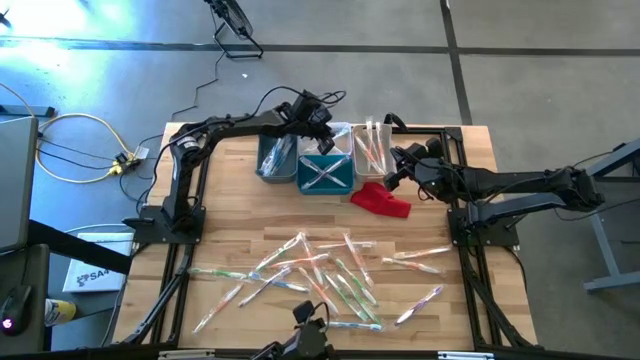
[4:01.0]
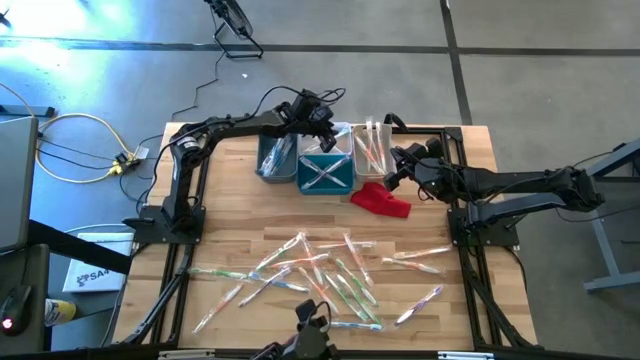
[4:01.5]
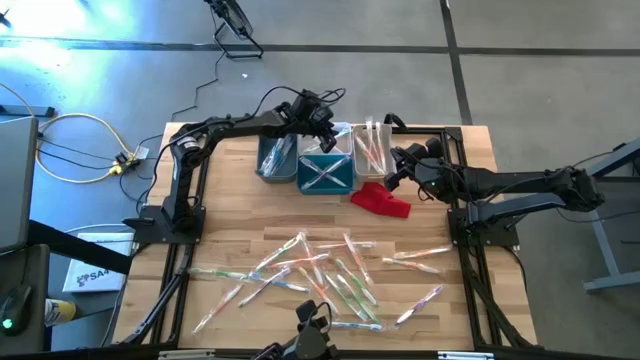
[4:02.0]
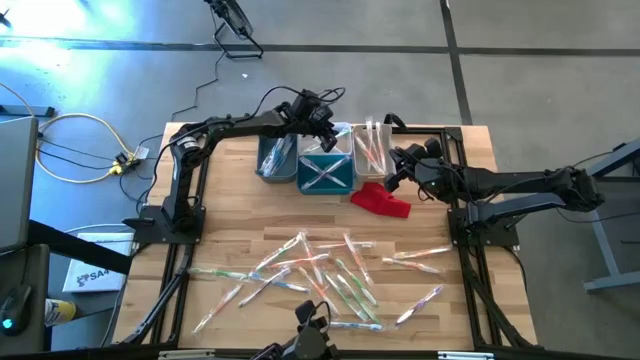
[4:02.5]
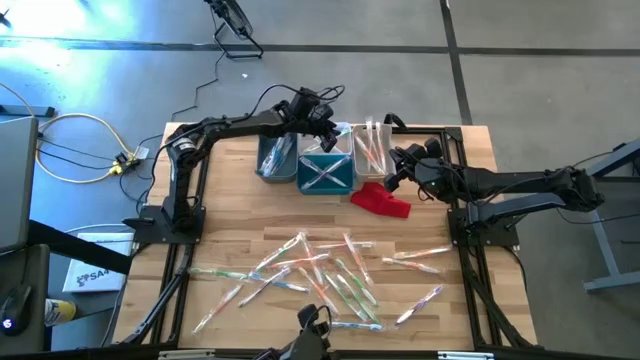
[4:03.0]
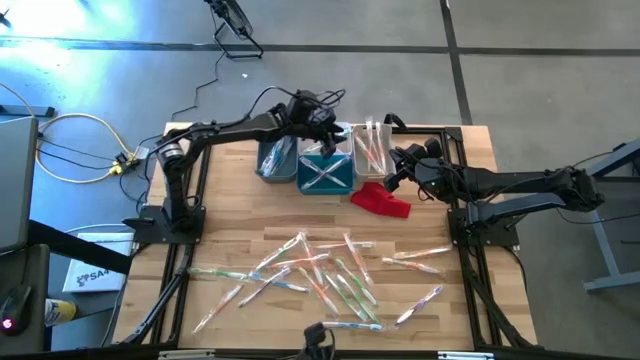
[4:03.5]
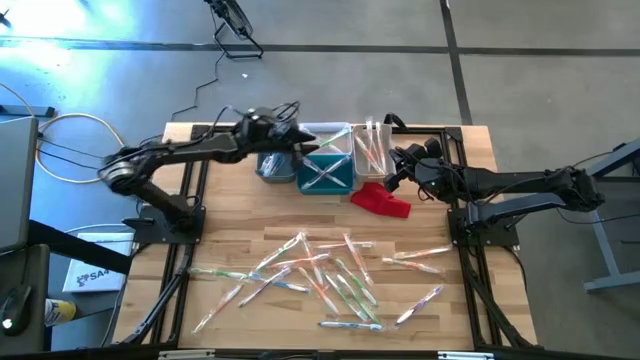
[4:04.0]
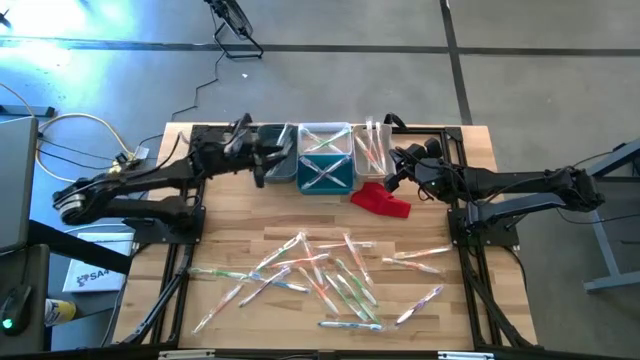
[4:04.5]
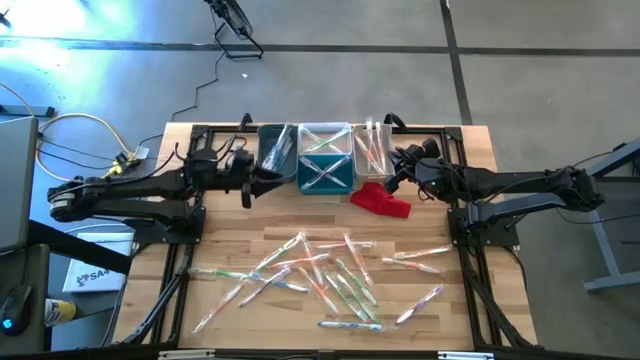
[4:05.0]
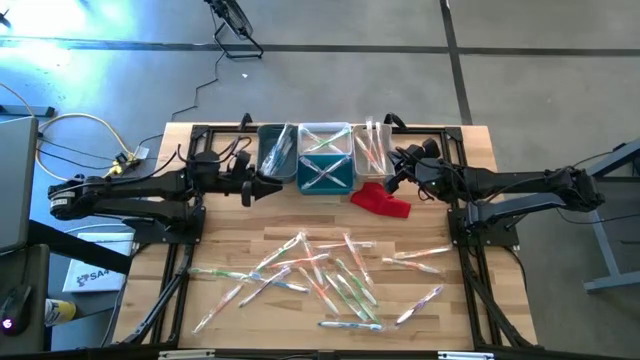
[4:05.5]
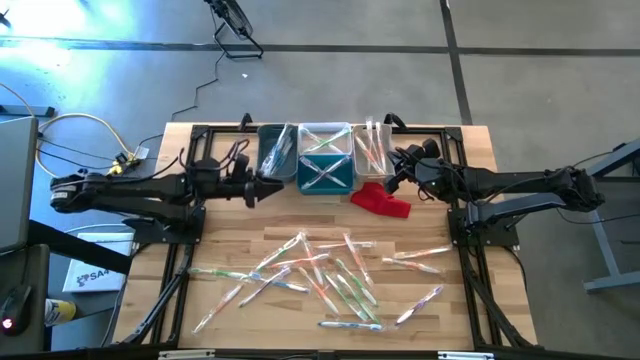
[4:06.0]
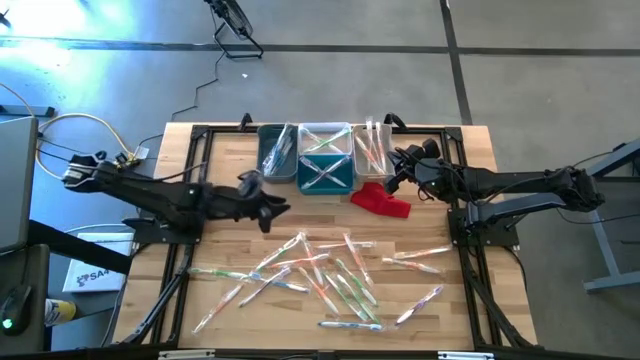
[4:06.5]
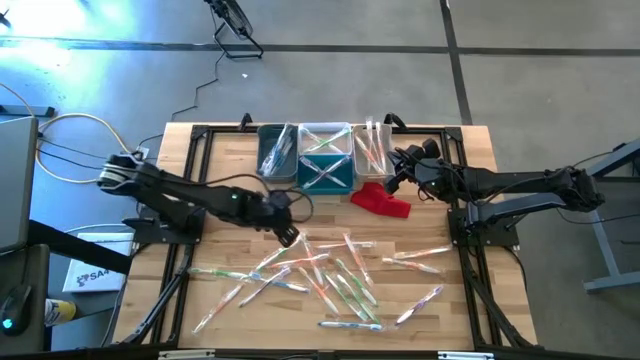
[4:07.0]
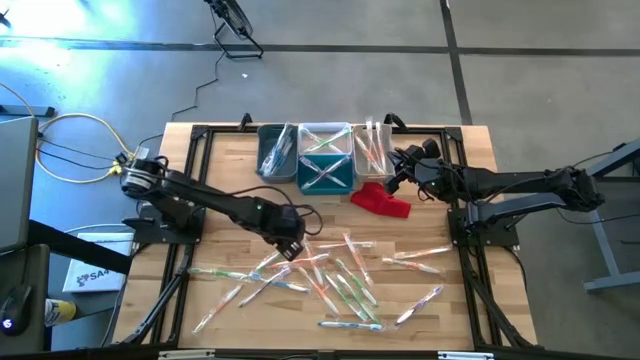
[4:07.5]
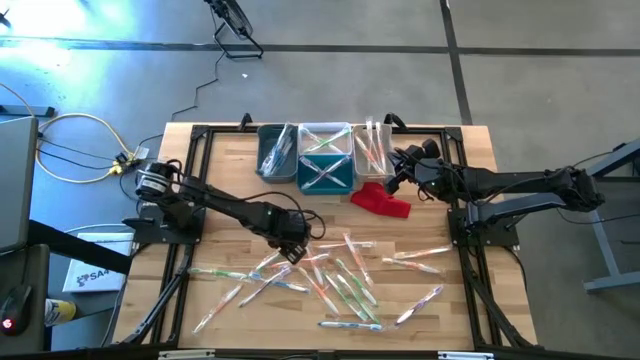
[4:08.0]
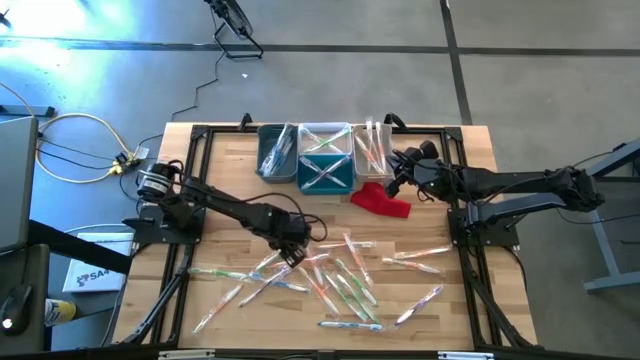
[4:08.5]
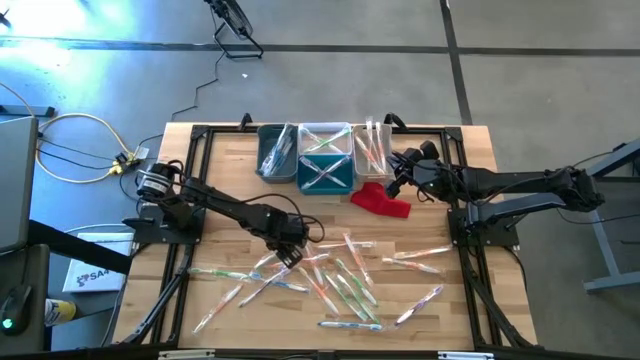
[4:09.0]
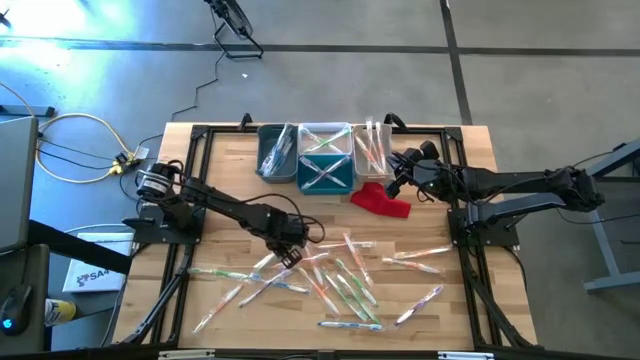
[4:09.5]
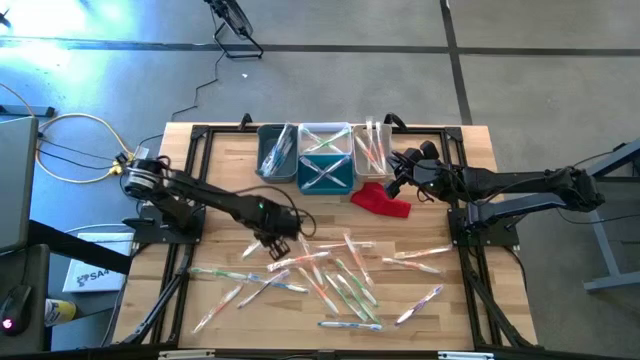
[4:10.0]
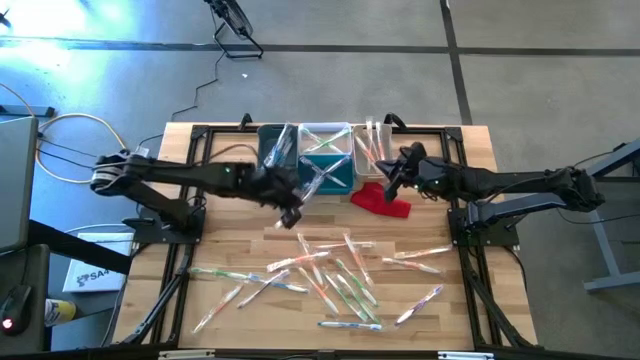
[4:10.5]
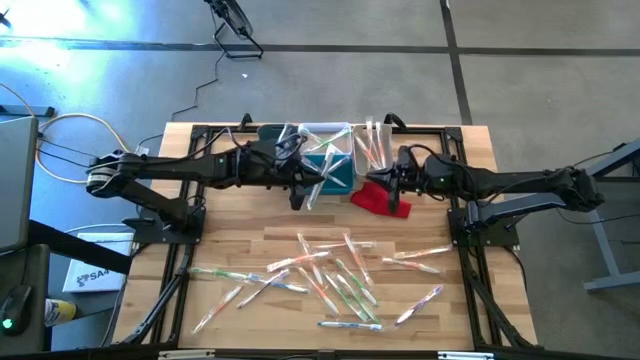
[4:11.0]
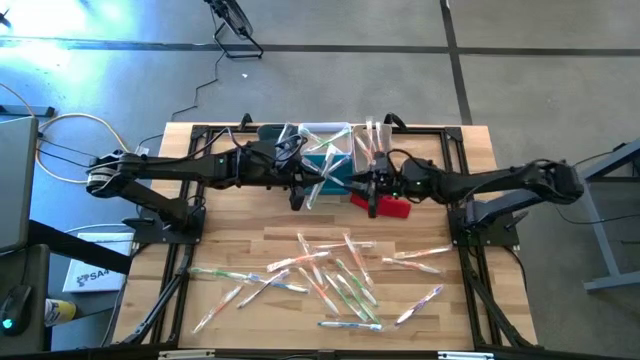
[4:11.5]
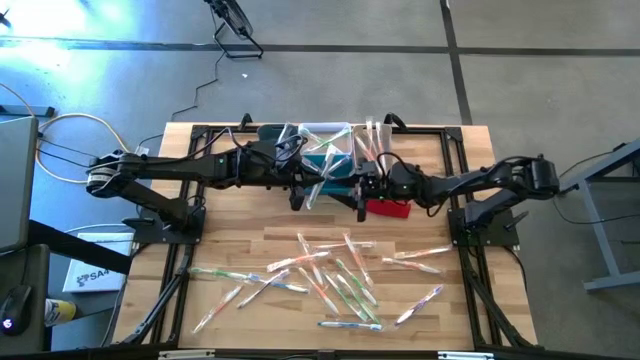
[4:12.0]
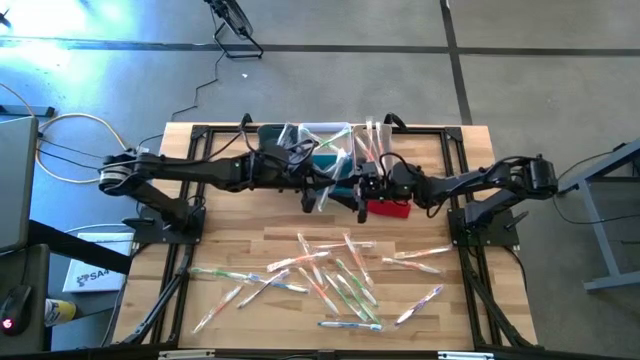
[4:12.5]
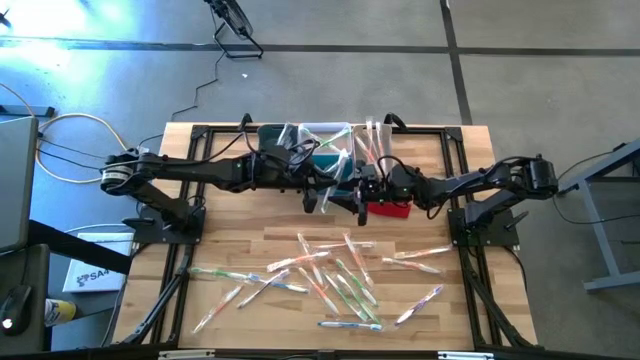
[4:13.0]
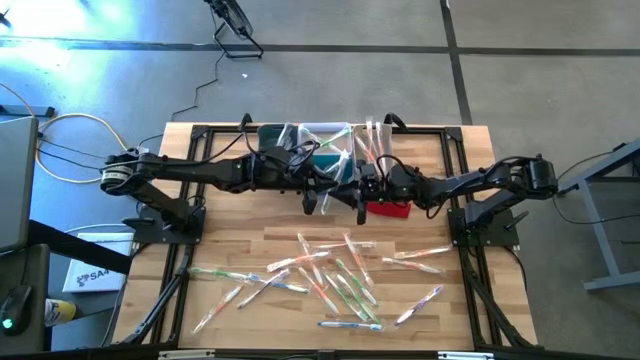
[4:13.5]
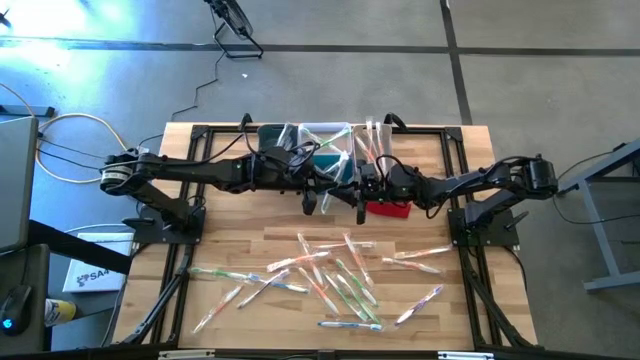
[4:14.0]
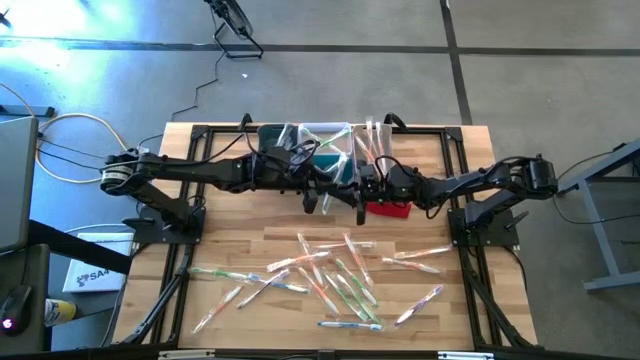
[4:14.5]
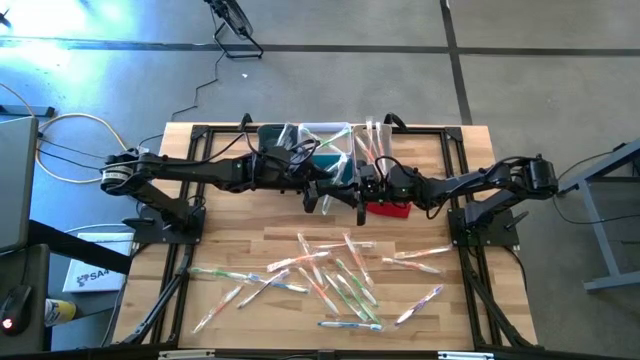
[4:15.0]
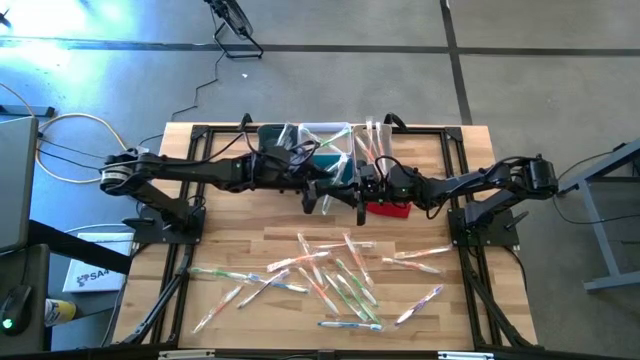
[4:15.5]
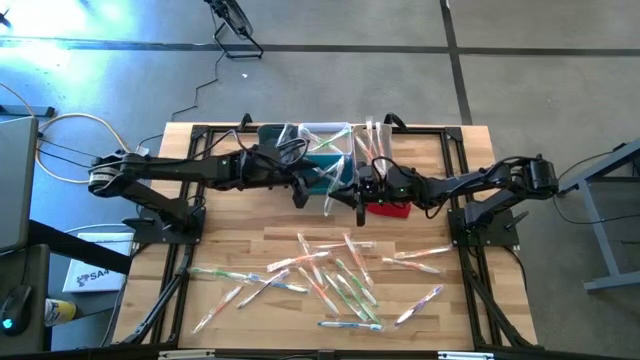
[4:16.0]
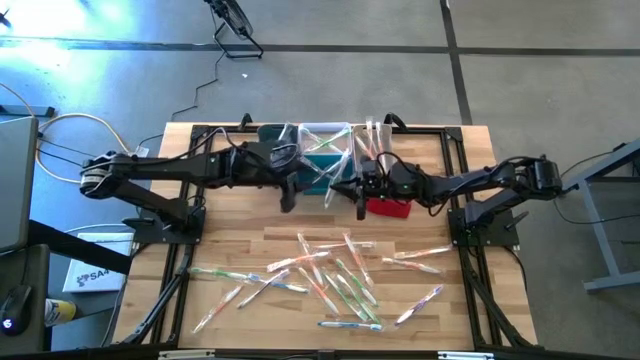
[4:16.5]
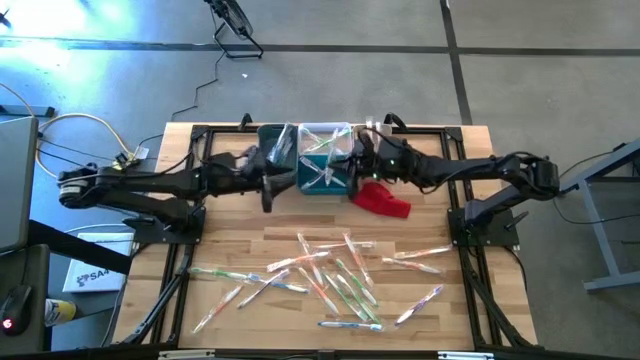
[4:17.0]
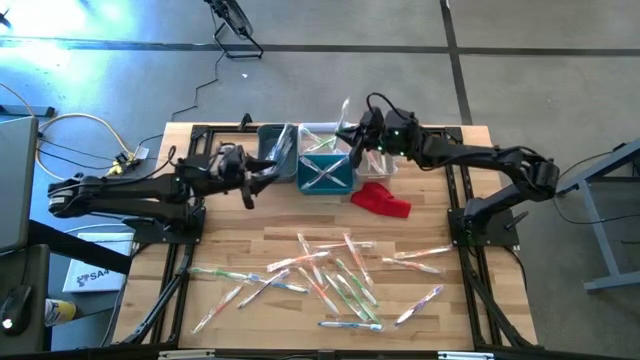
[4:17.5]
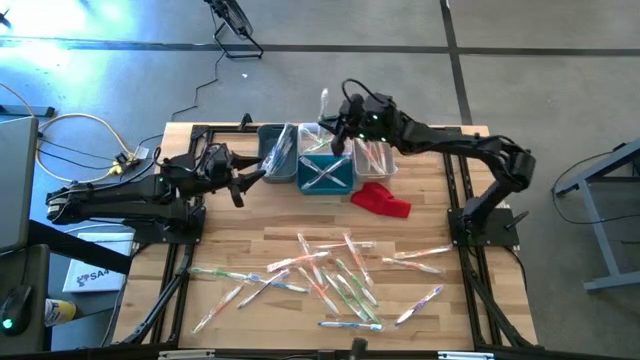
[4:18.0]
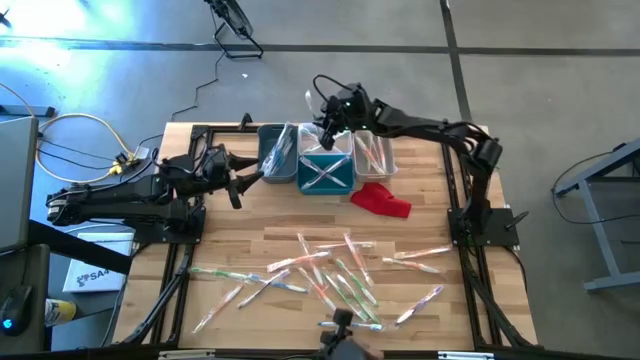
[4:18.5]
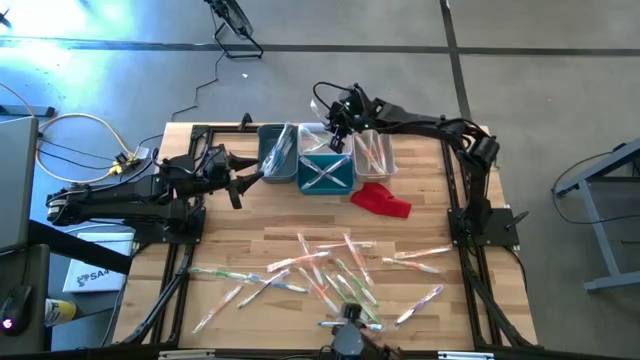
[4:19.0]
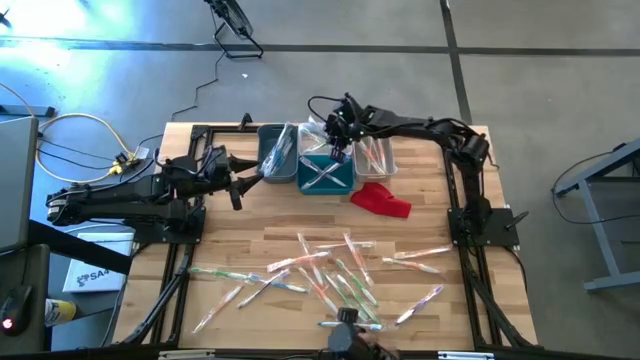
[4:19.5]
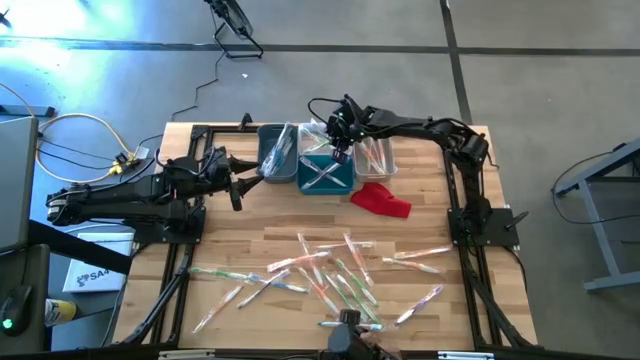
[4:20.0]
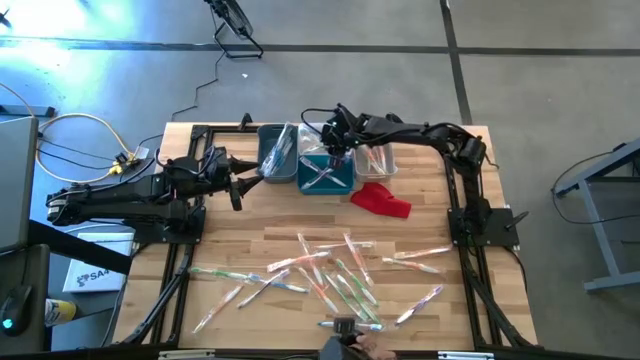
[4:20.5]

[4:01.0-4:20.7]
Task: Pick & Place Toothbrushes
Put the green toothbrush into the transparent bin

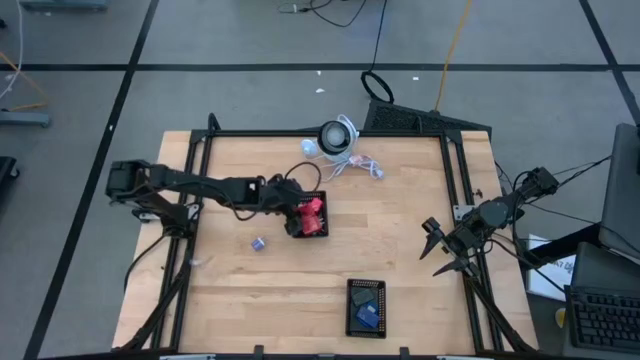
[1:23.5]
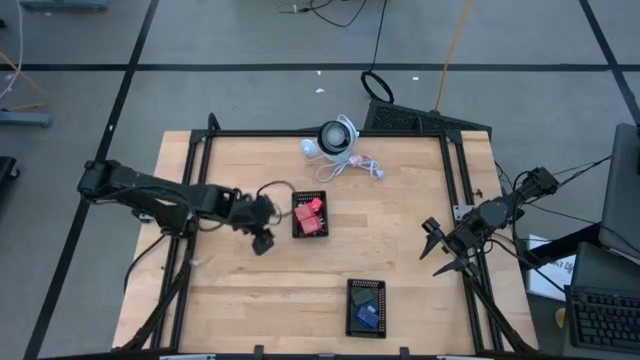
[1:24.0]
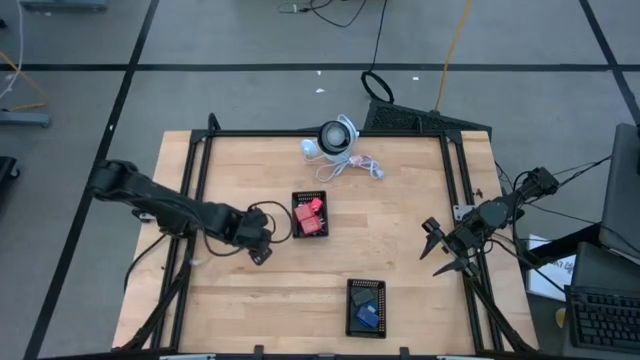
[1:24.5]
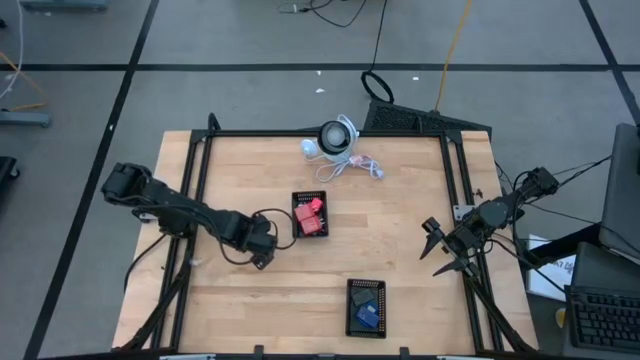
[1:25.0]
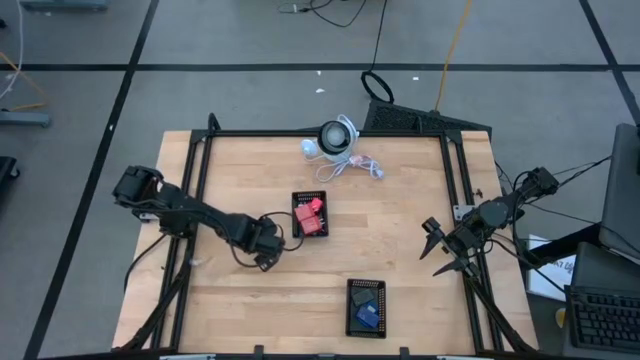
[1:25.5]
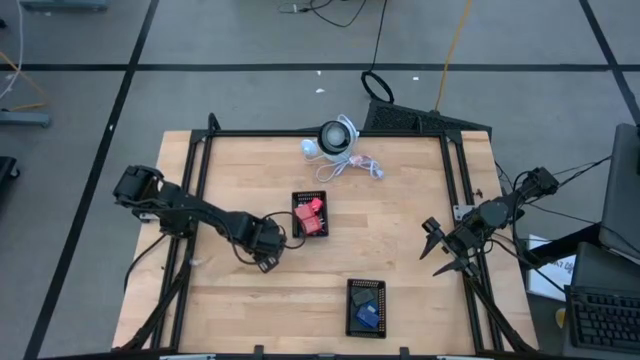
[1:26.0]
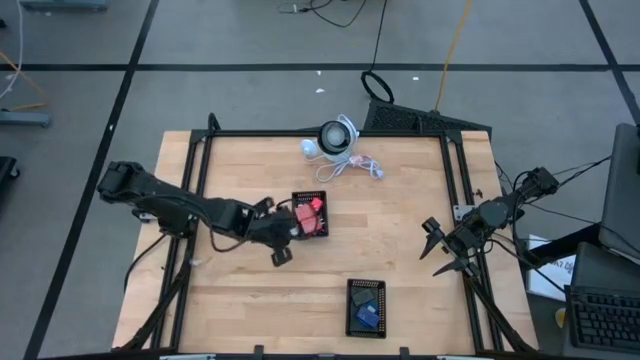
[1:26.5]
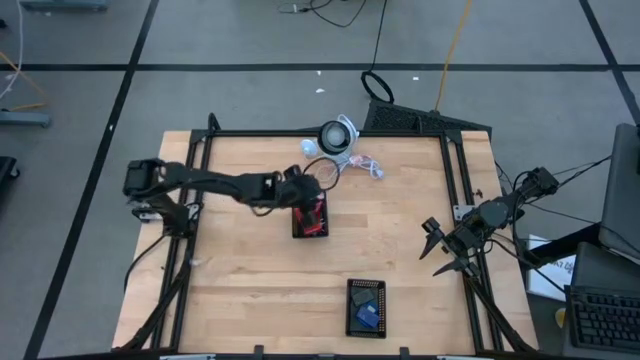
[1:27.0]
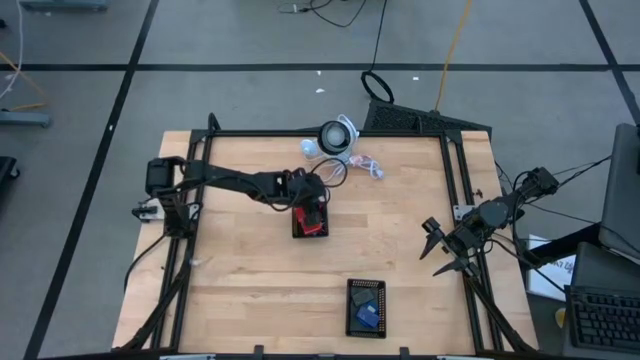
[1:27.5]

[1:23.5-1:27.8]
Task: Pick & Place Office items
Put the violet charger into the top black basket
